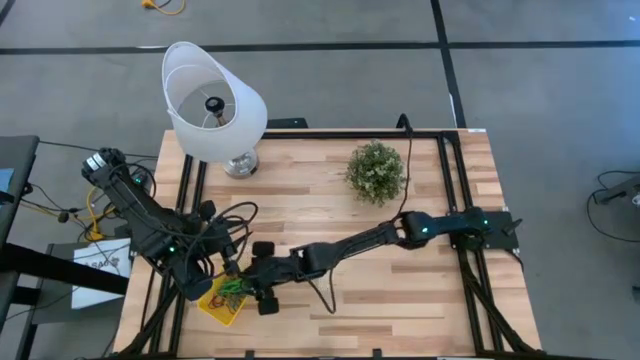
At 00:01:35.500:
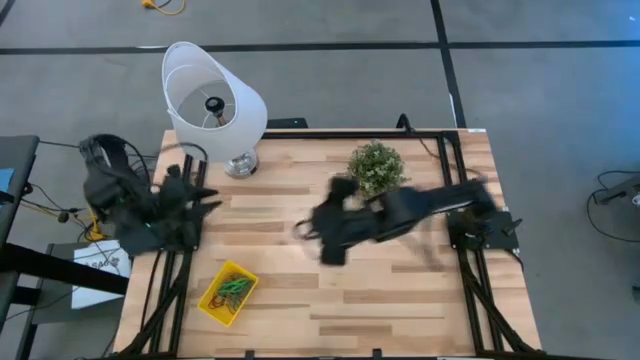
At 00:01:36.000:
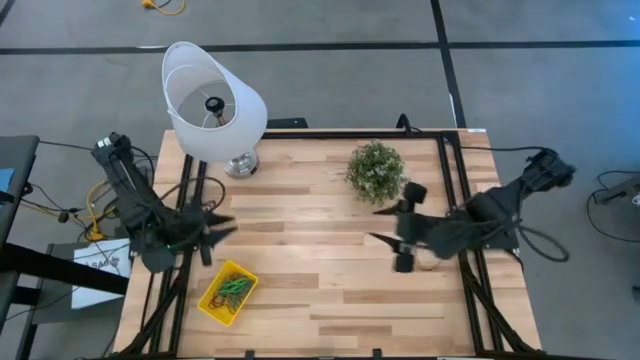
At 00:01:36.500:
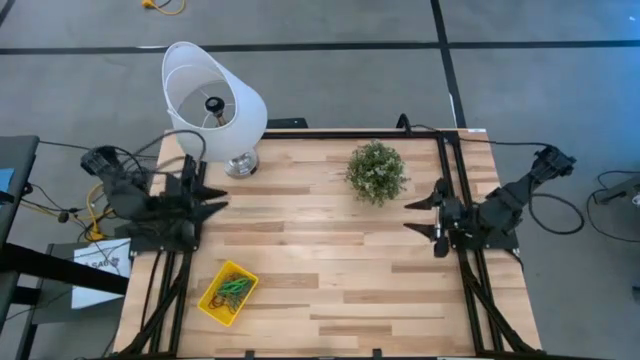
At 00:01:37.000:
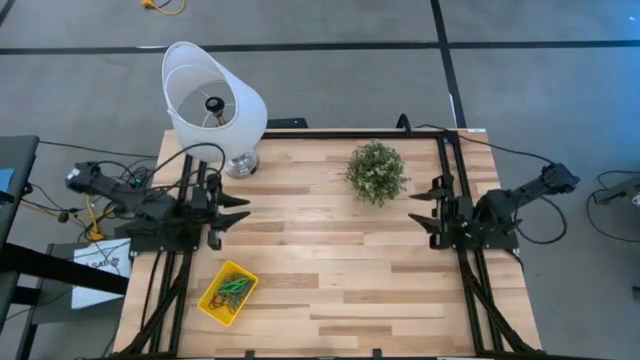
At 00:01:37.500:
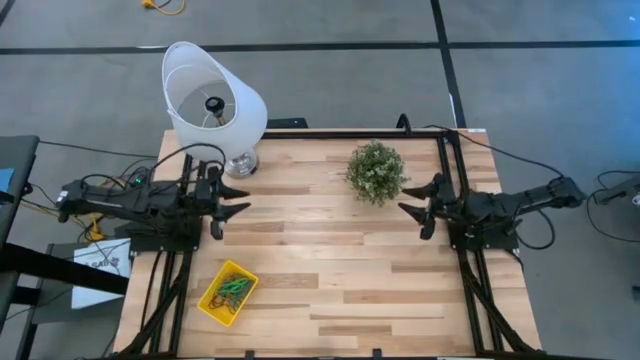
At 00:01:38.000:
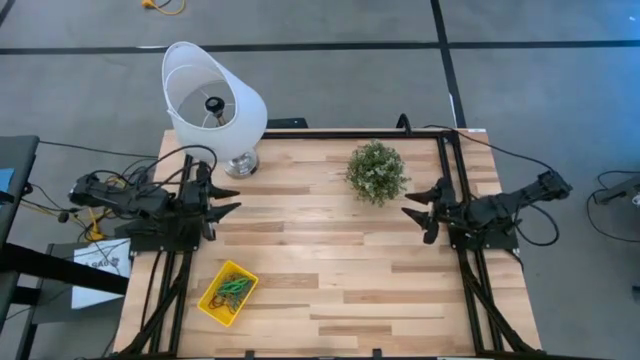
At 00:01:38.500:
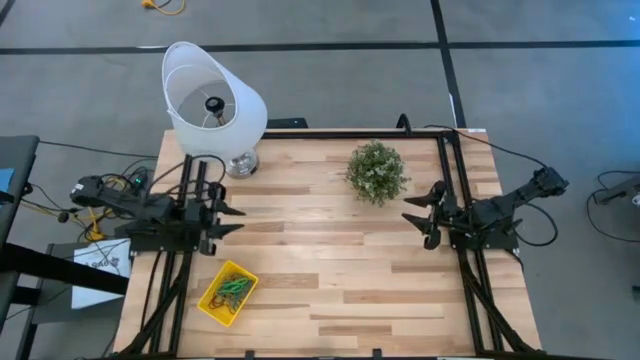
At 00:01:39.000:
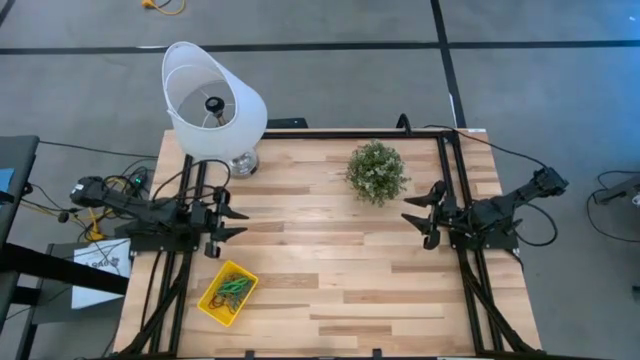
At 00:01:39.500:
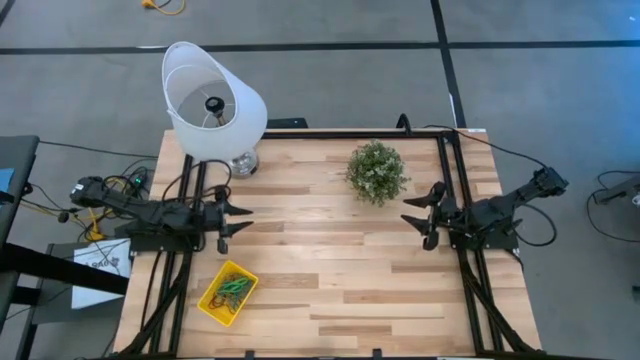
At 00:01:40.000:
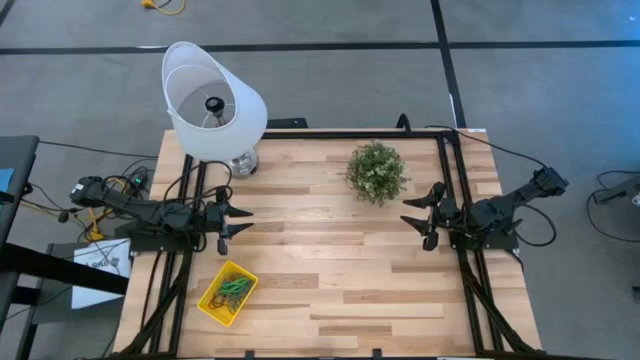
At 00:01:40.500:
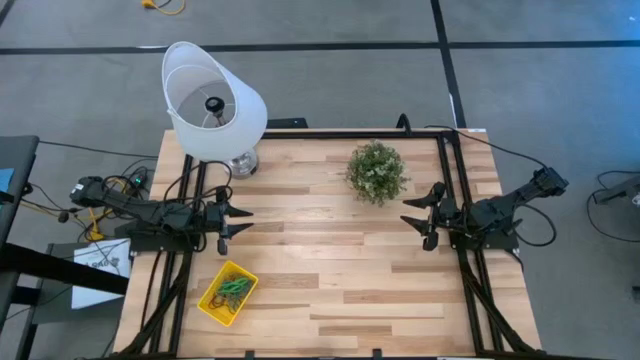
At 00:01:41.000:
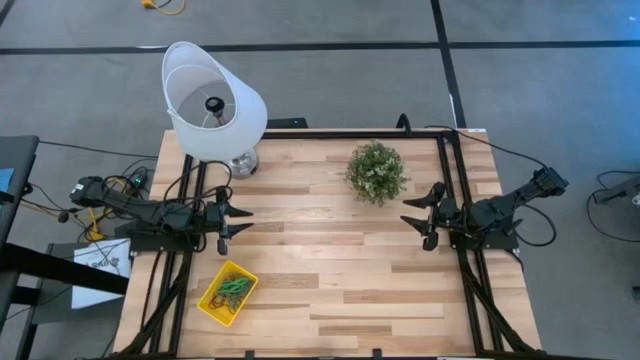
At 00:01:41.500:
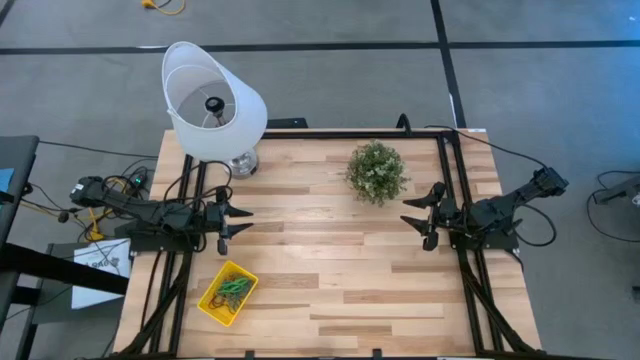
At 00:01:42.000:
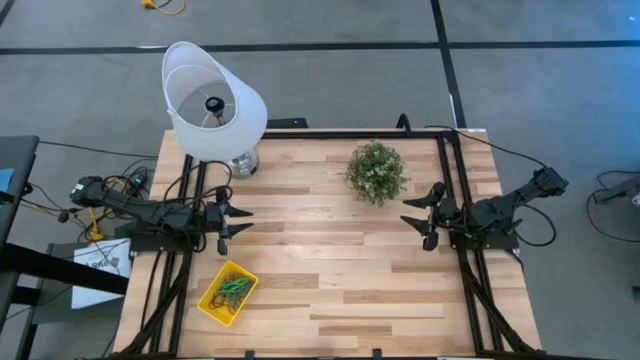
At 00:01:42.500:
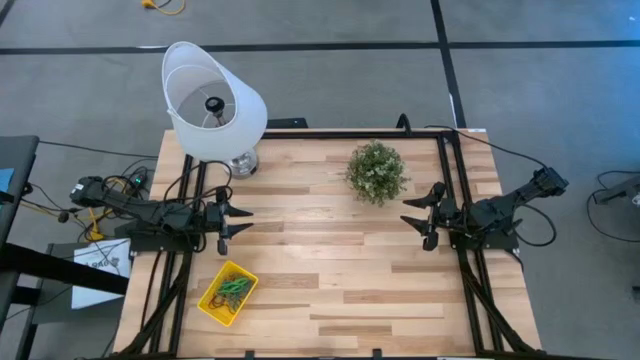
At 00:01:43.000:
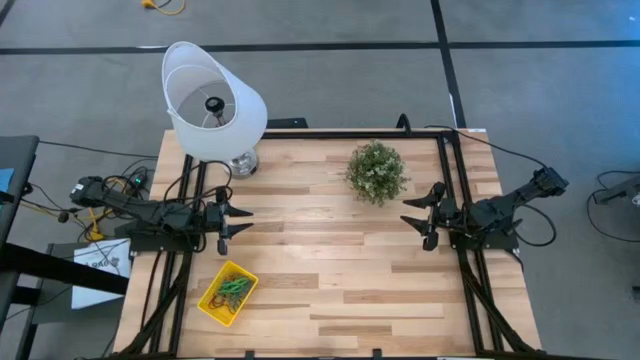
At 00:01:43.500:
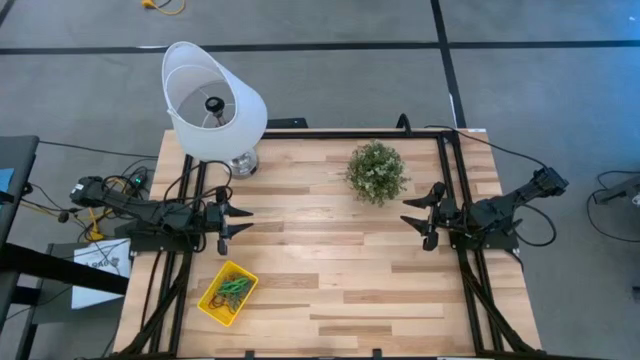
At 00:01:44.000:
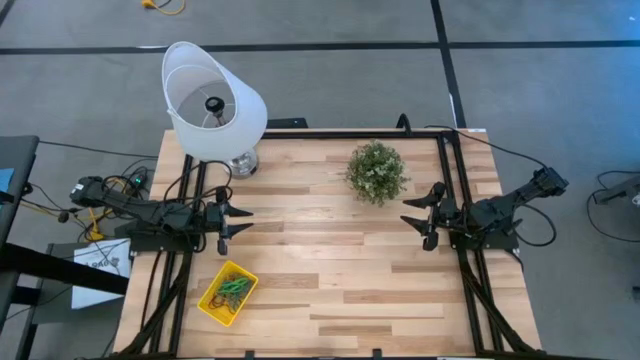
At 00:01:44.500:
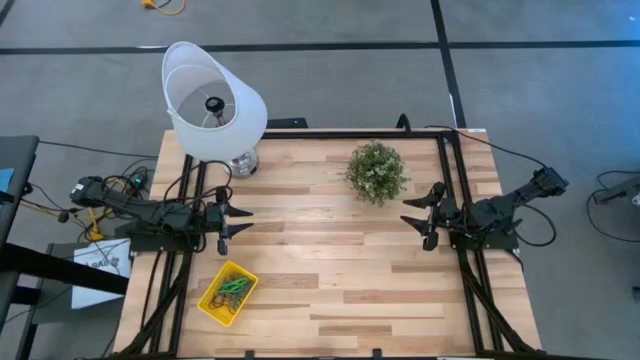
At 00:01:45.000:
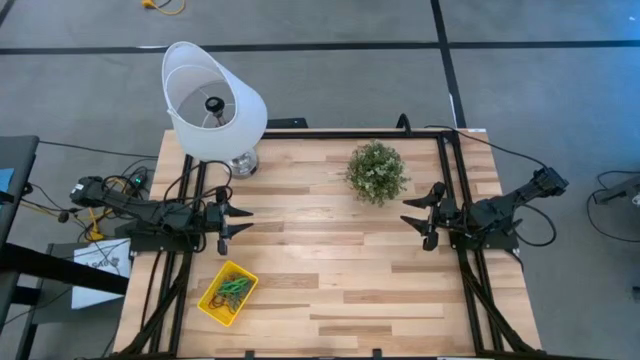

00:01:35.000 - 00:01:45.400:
Task: Pick and place items into bin
Return to Home Position

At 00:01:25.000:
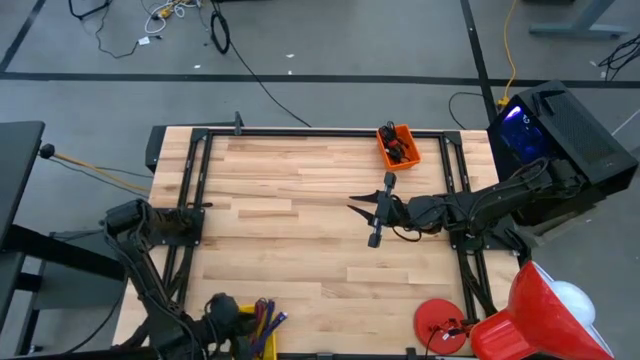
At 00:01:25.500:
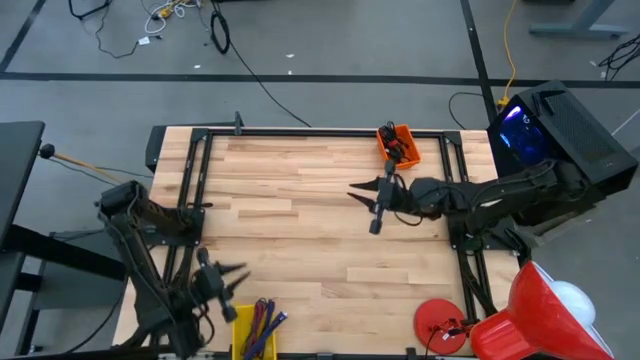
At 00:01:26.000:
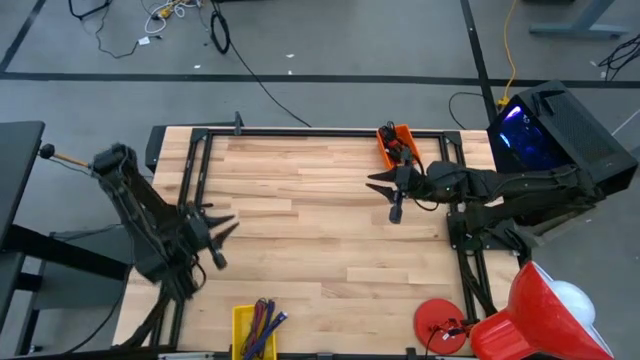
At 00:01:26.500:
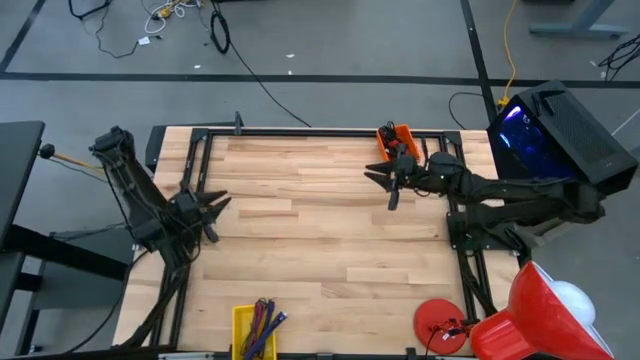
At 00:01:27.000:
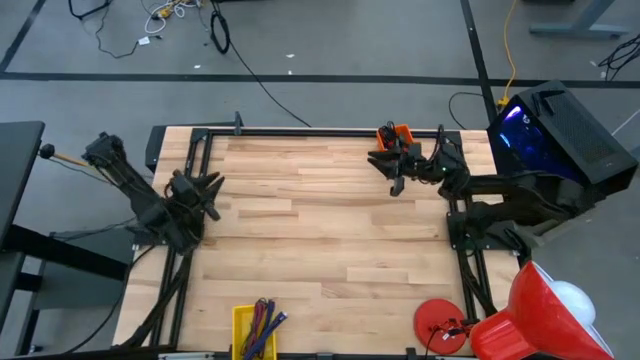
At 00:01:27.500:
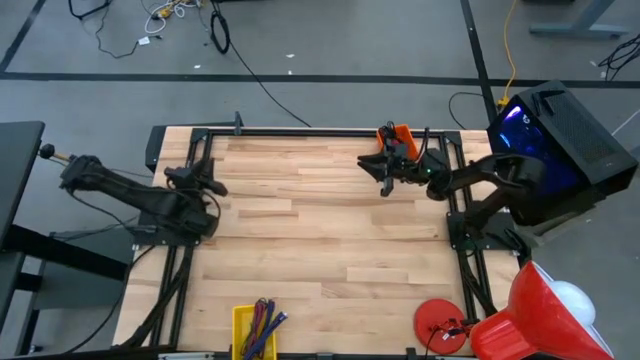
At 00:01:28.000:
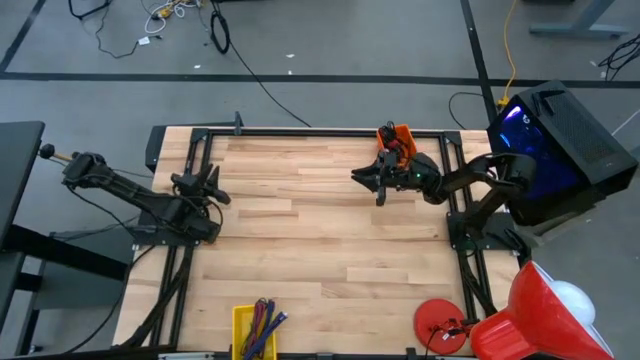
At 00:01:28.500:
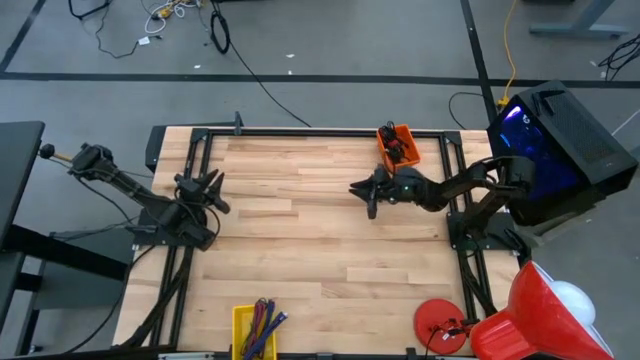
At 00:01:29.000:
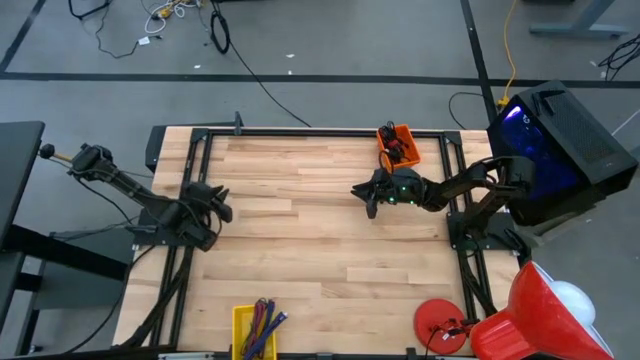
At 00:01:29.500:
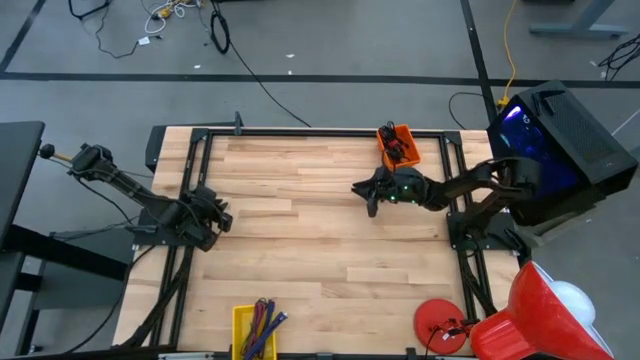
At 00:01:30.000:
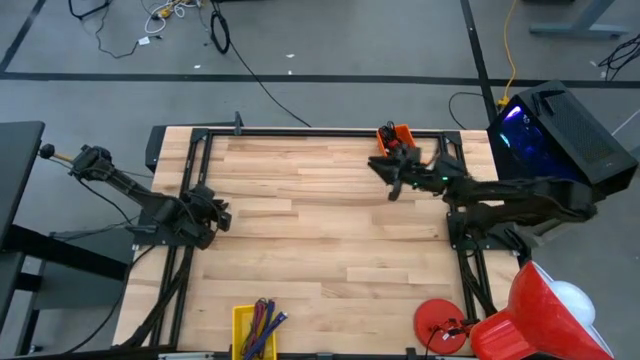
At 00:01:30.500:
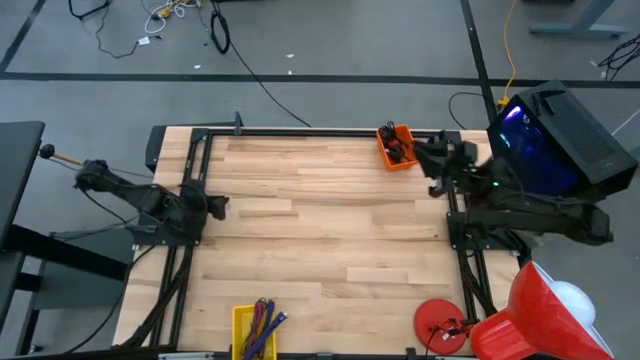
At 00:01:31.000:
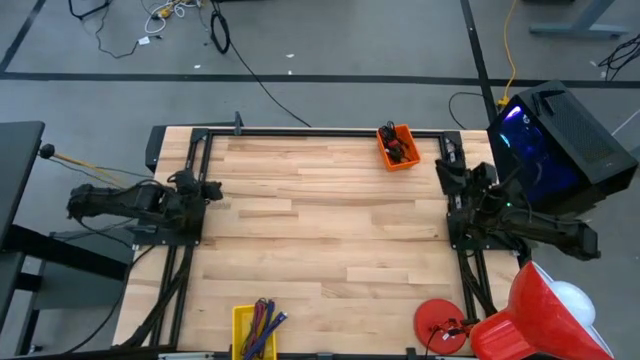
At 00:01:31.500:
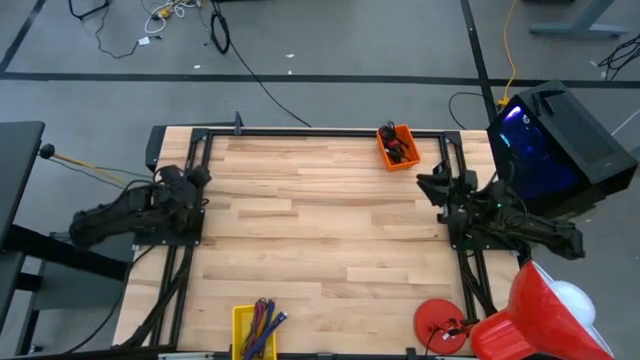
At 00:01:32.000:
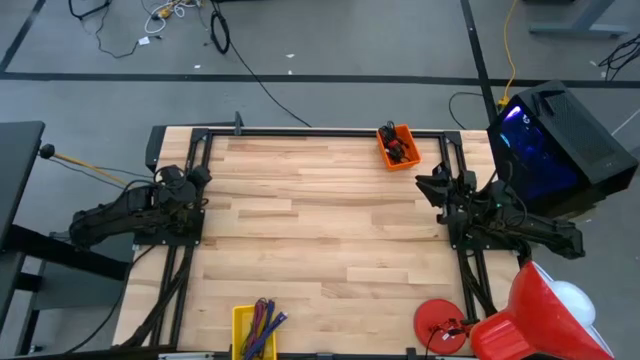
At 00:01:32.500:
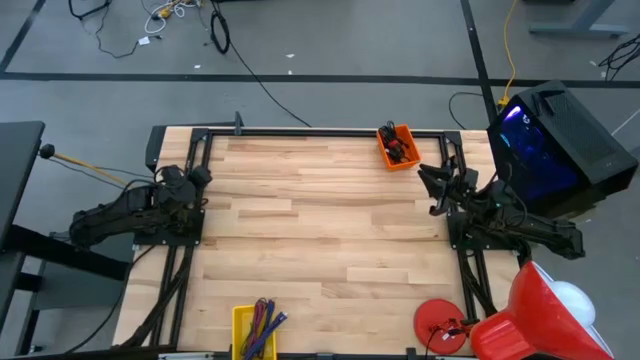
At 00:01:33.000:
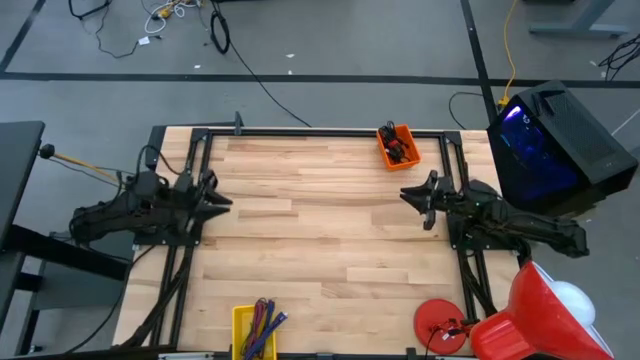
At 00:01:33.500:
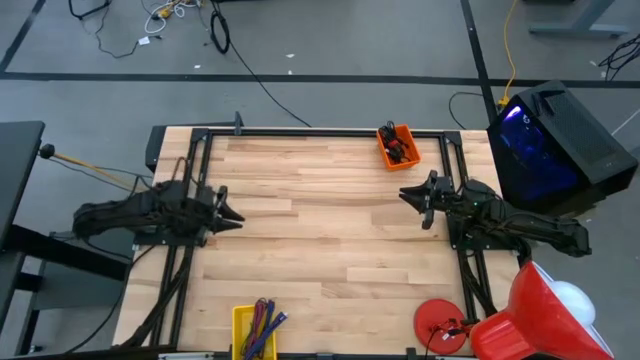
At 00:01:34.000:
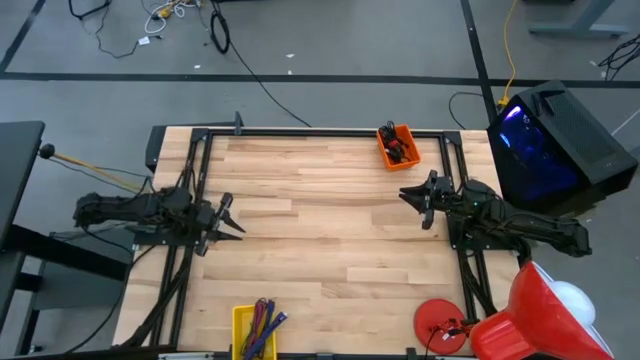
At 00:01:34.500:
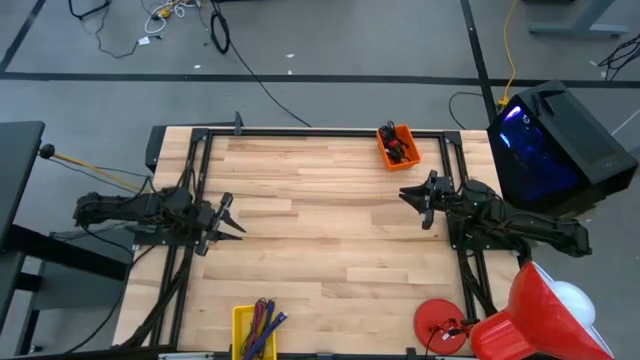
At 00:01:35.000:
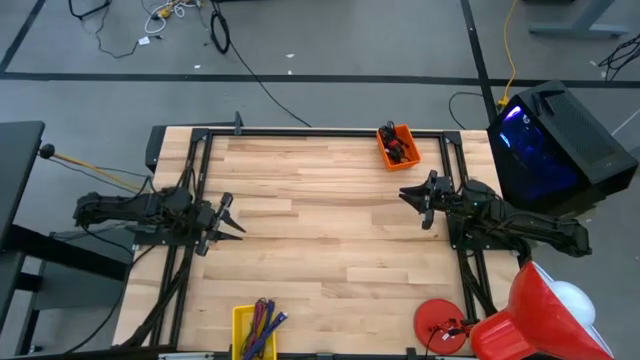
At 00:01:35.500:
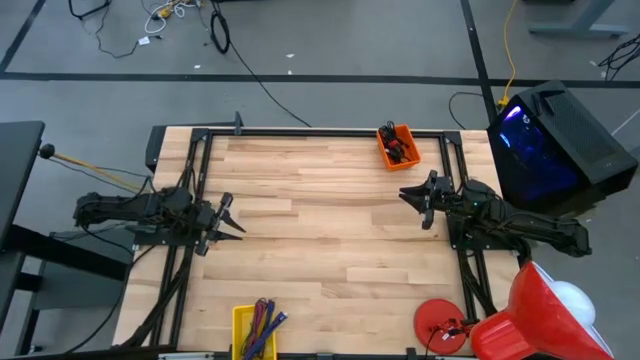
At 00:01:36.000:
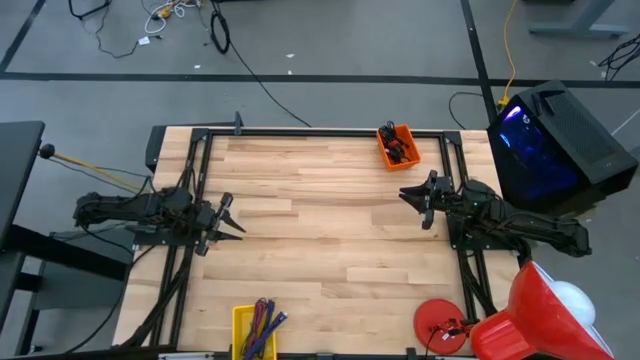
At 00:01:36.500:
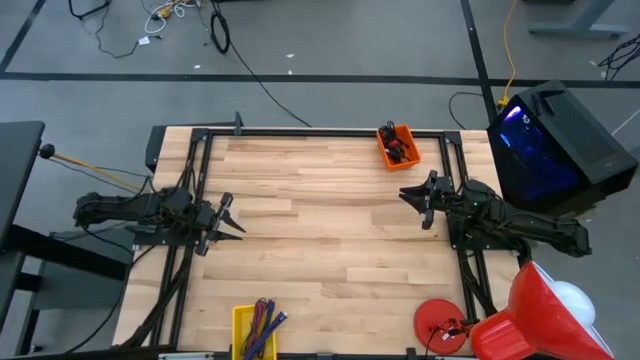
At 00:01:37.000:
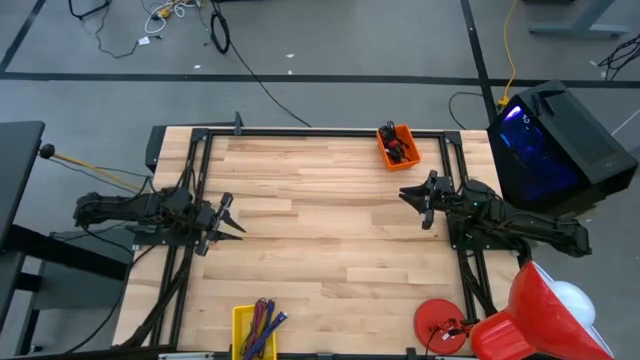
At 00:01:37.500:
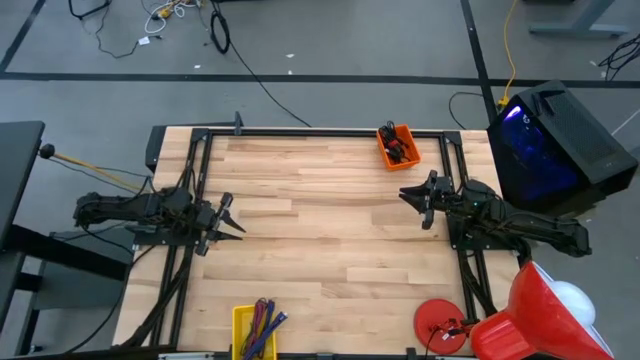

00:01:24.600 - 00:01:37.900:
Task: Pick & Place USB Port
Return to Home Position
